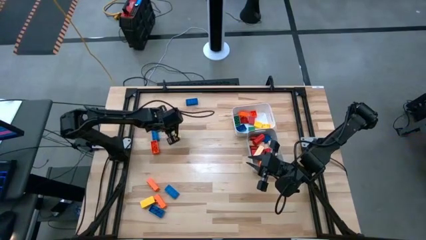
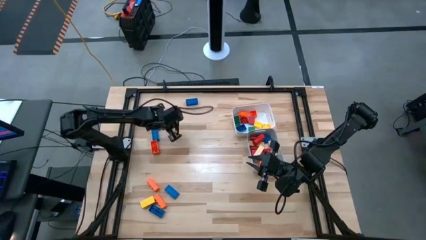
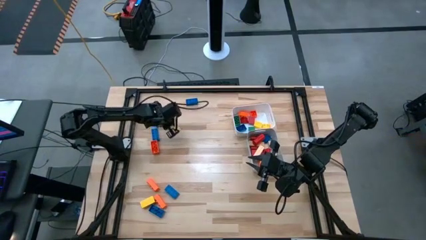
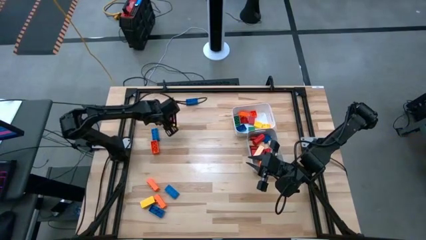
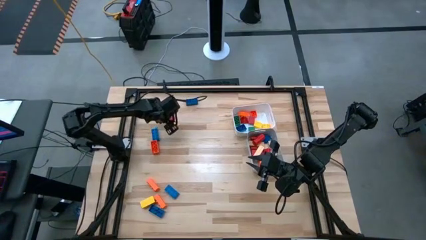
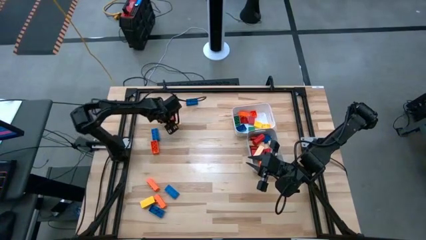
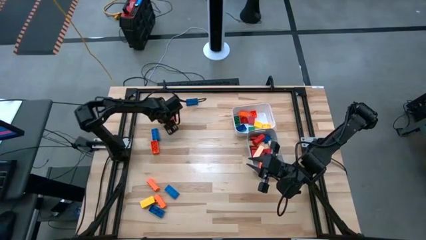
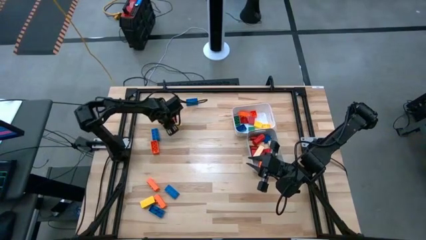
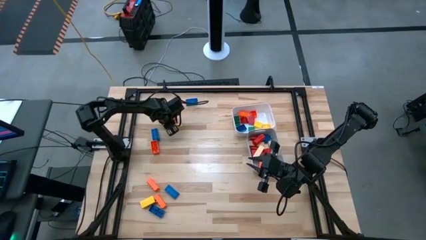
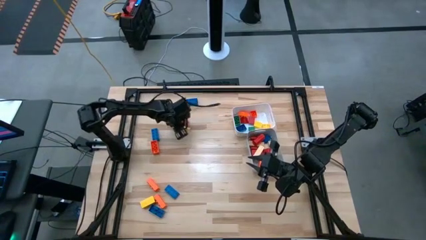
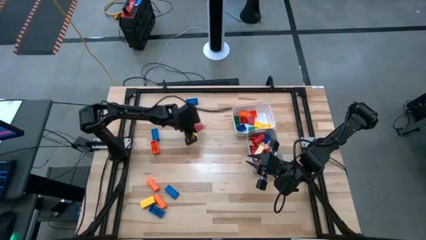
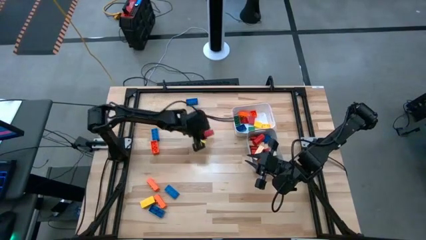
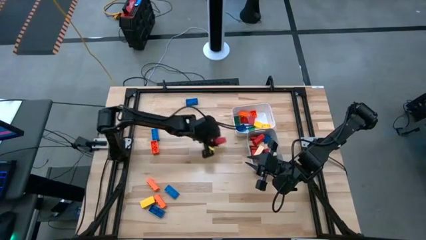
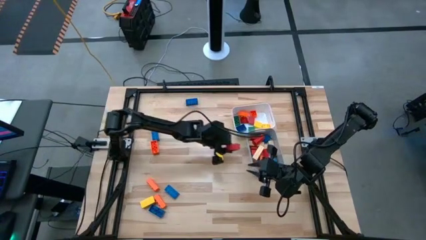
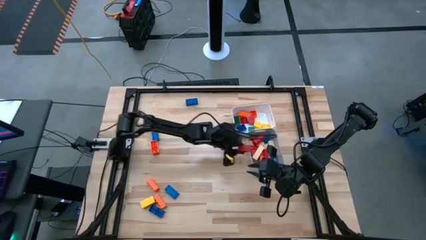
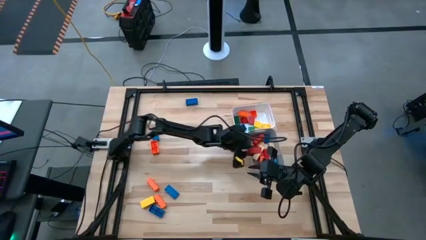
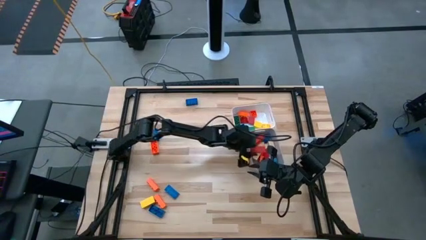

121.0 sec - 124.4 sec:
Task: Sort blocks by size
Put the large red wooden block into the gray bin

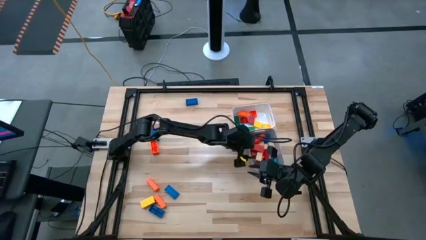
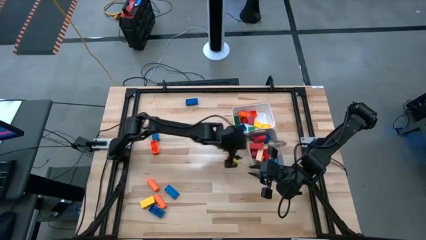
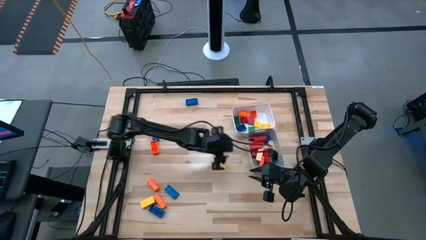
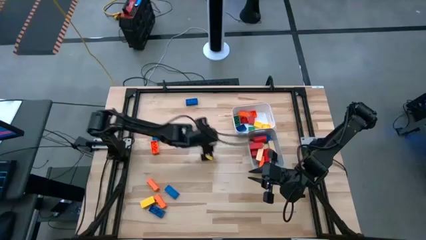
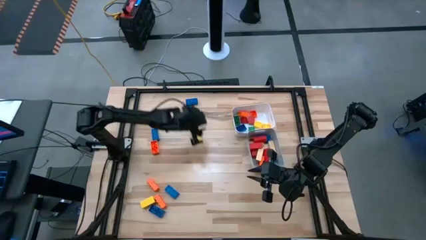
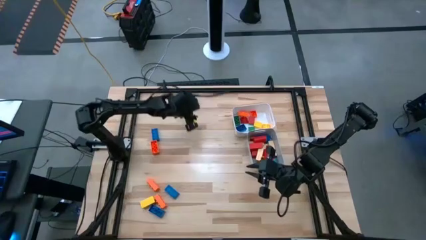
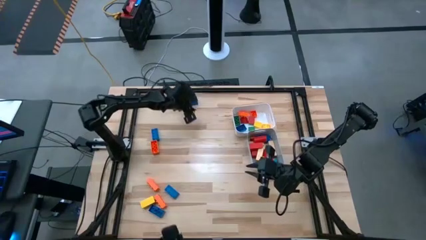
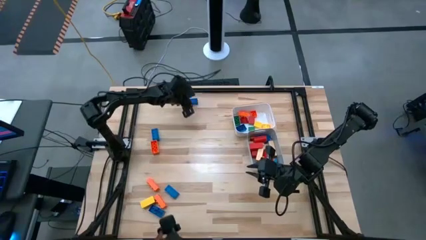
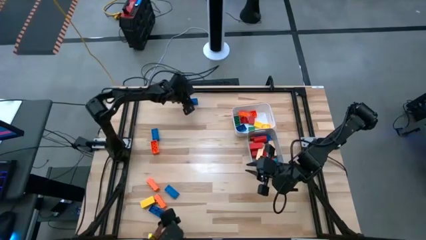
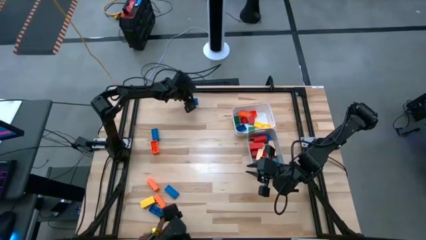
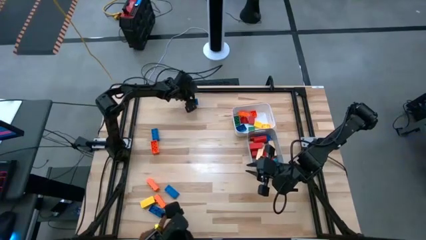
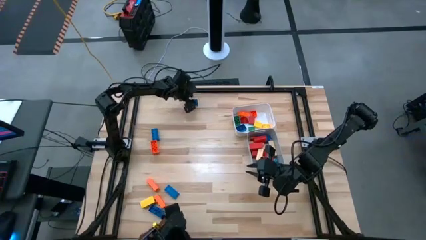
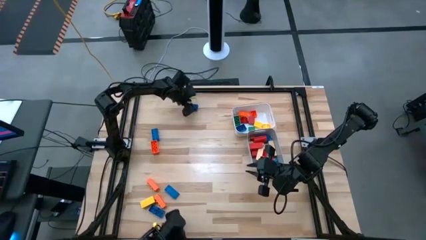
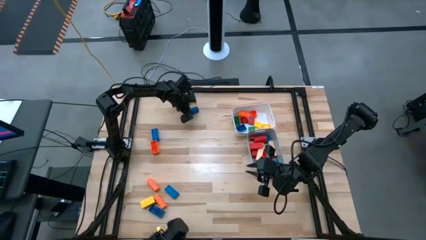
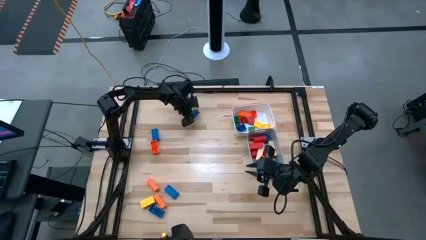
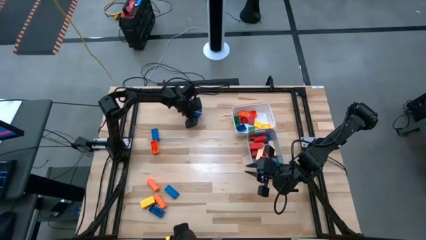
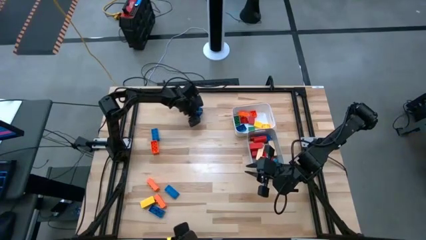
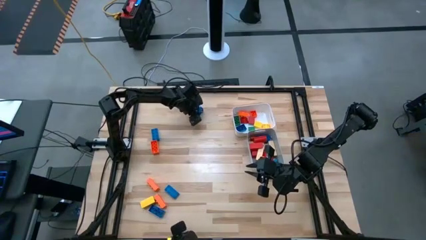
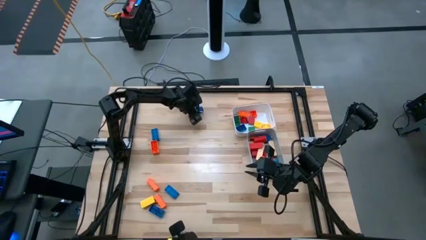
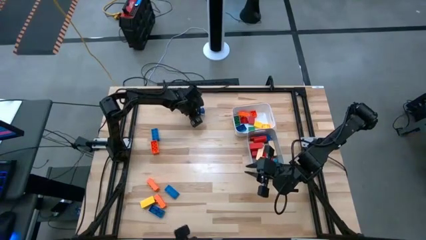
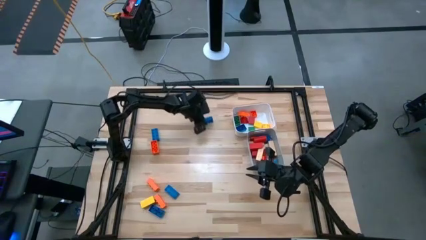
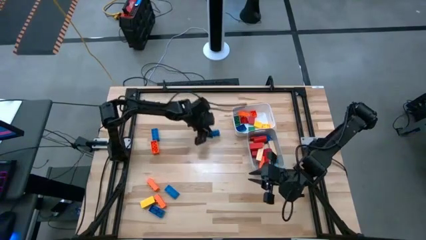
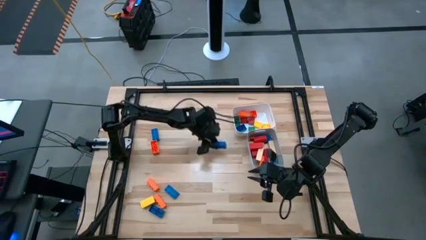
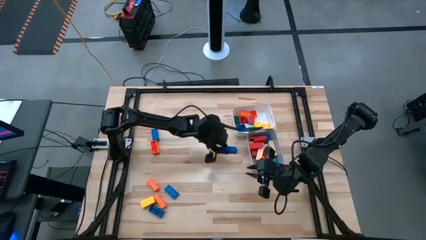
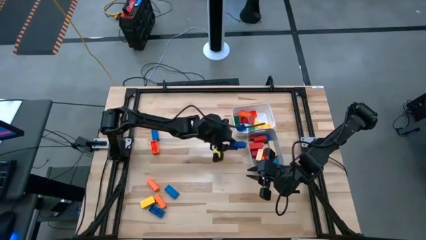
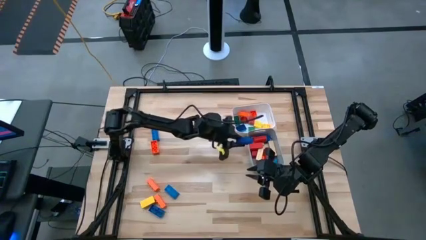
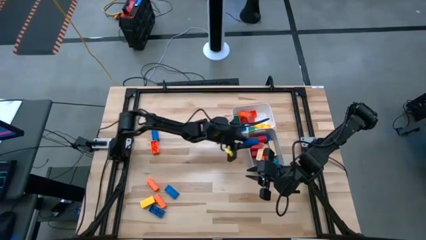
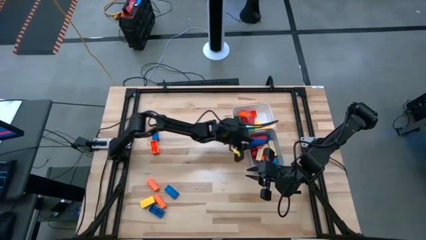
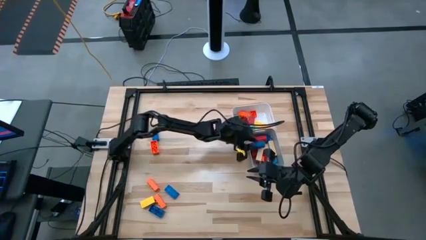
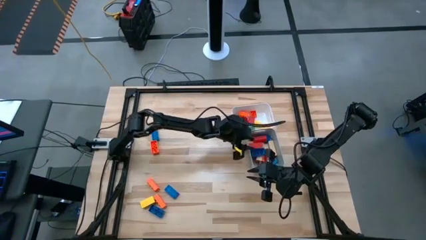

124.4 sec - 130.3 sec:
Put the large blue game piece into the gray bin

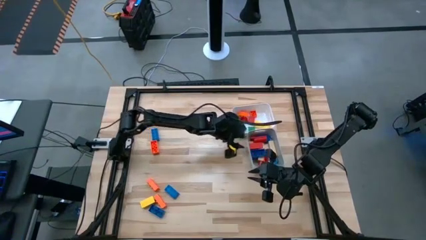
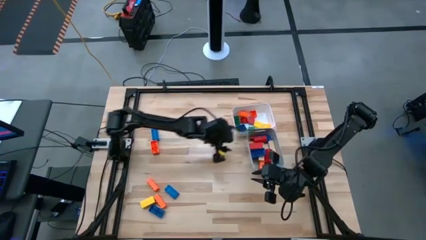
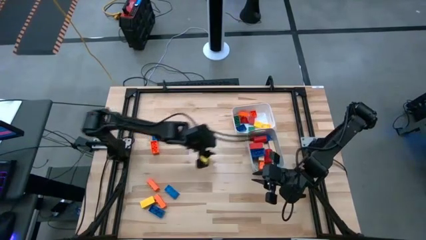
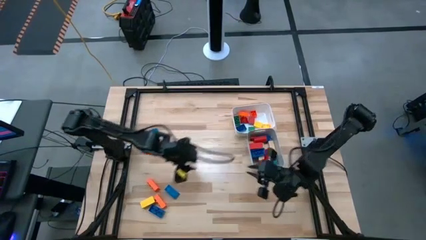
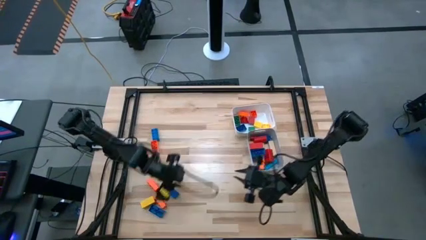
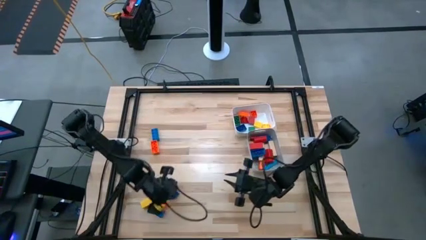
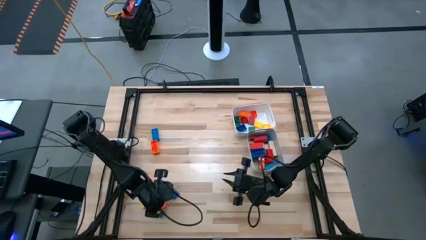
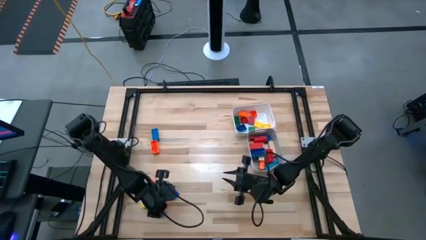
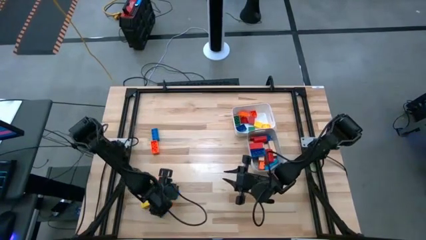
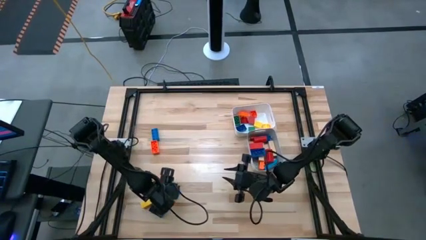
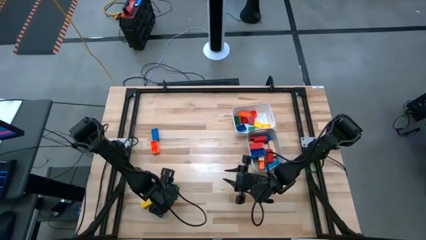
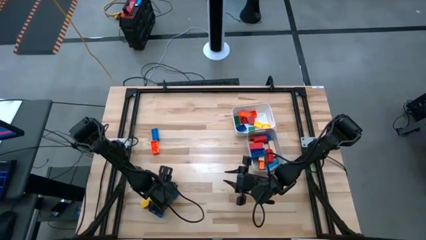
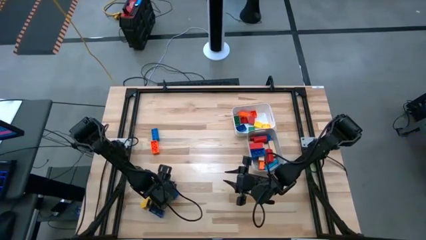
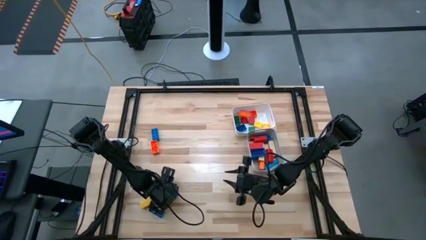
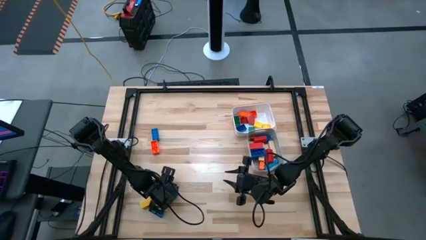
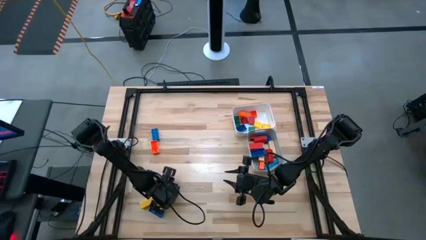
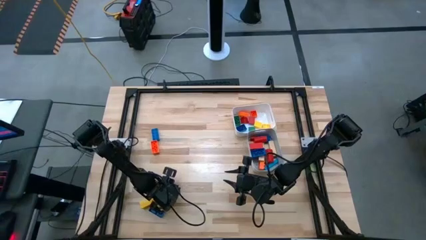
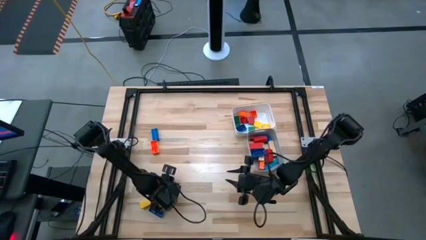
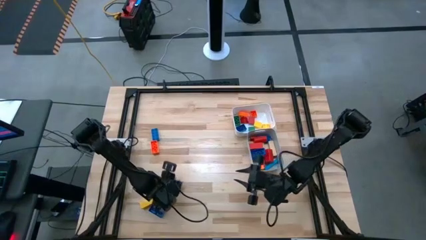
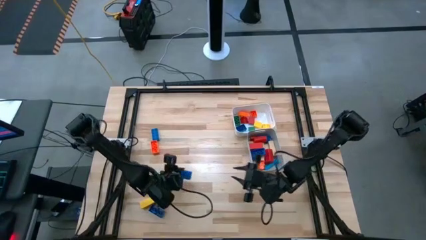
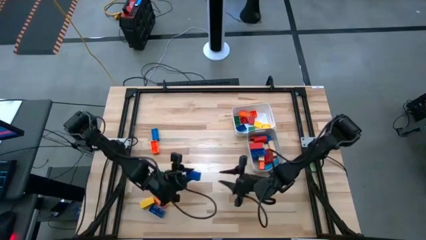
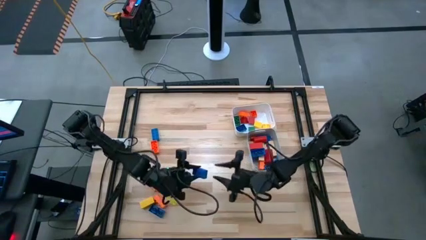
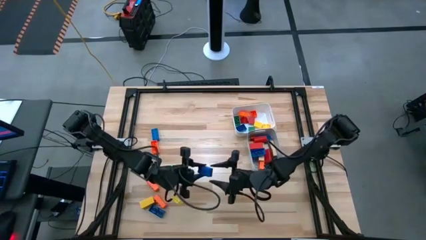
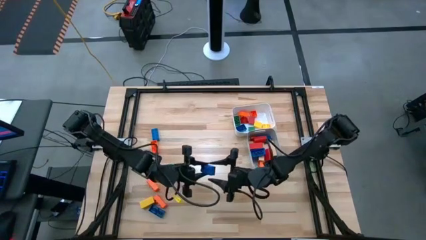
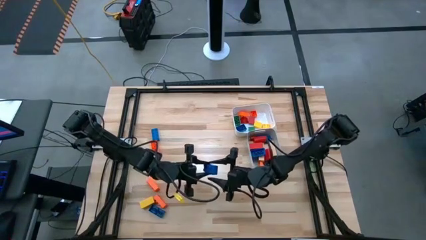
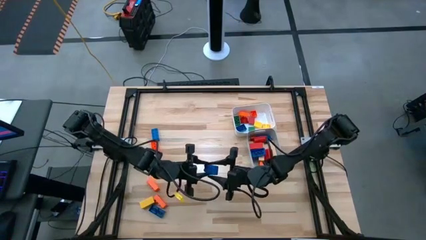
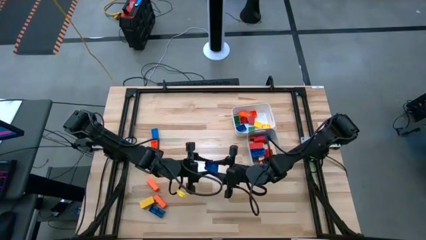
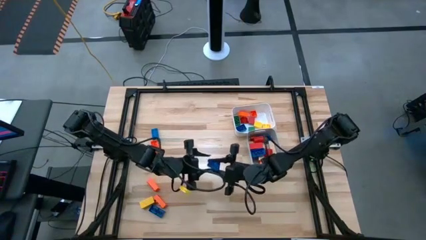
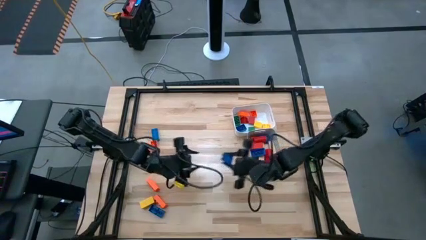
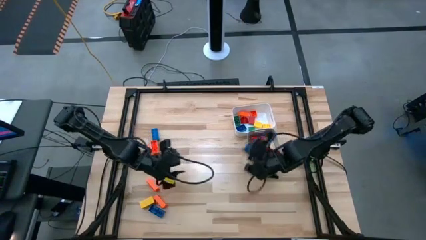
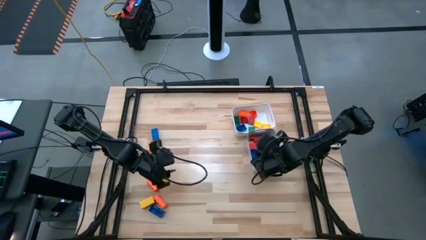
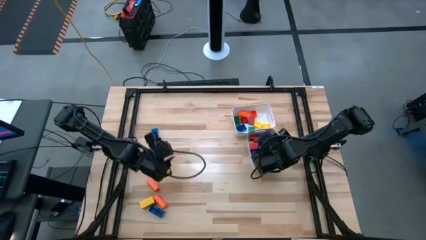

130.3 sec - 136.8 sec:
Put the large blue game piece into the gray bin
